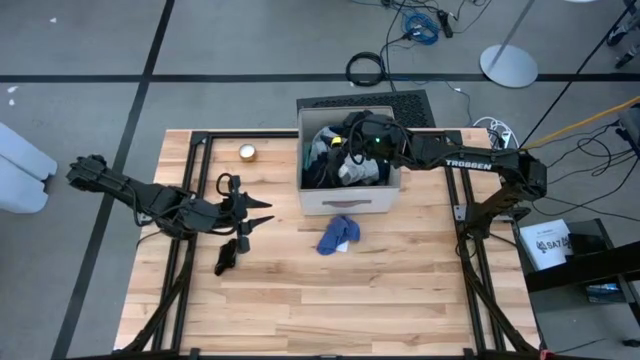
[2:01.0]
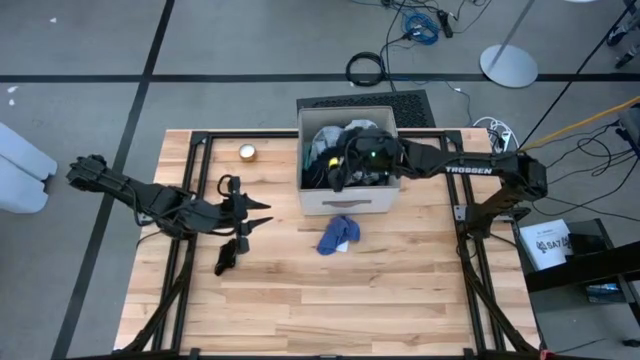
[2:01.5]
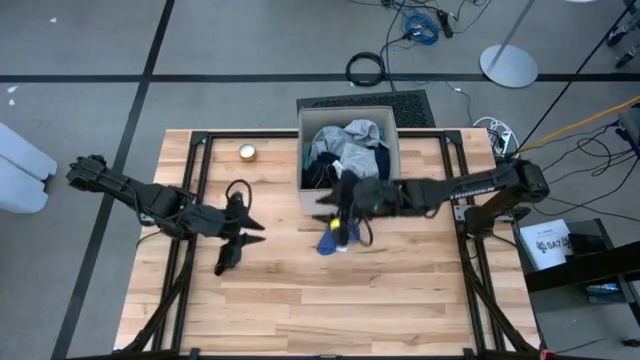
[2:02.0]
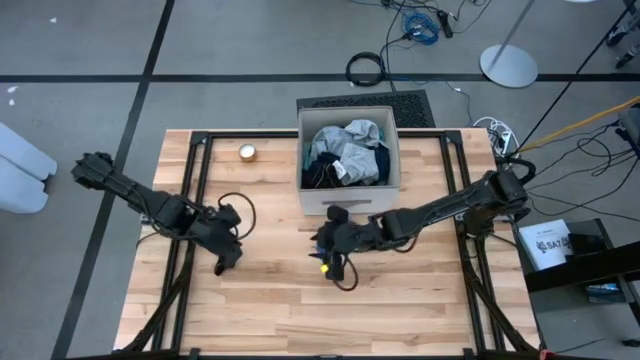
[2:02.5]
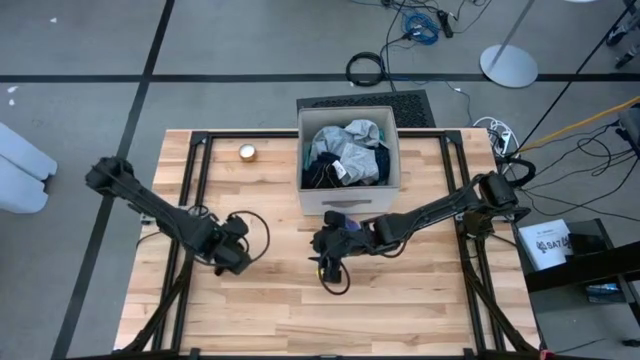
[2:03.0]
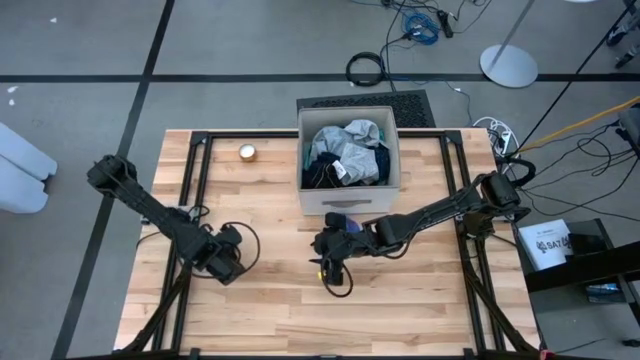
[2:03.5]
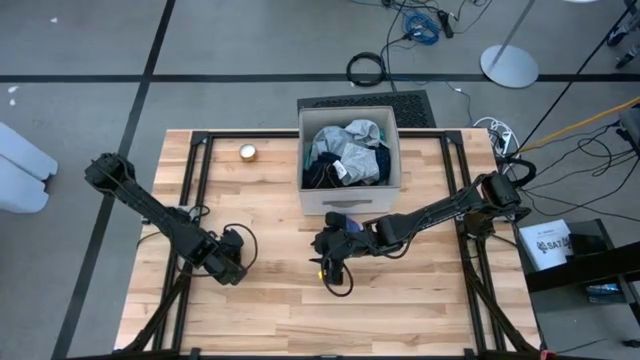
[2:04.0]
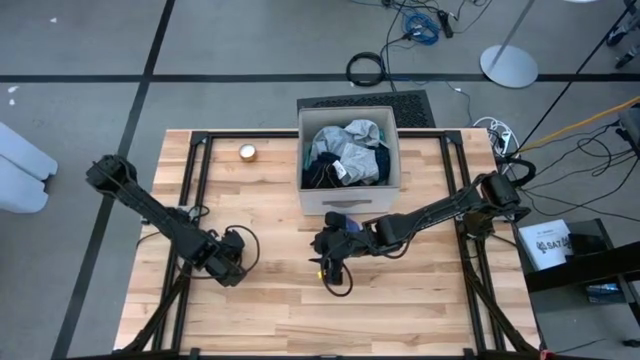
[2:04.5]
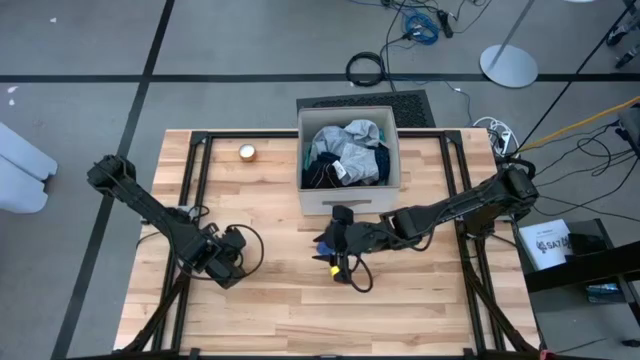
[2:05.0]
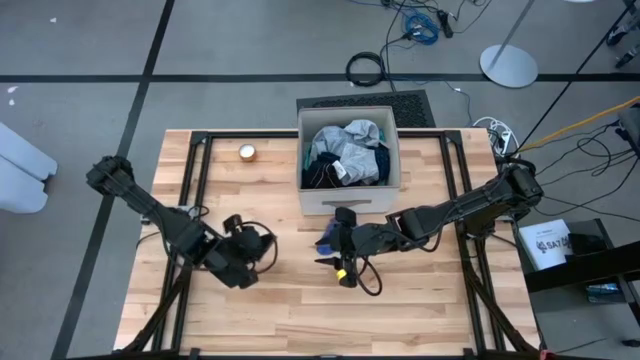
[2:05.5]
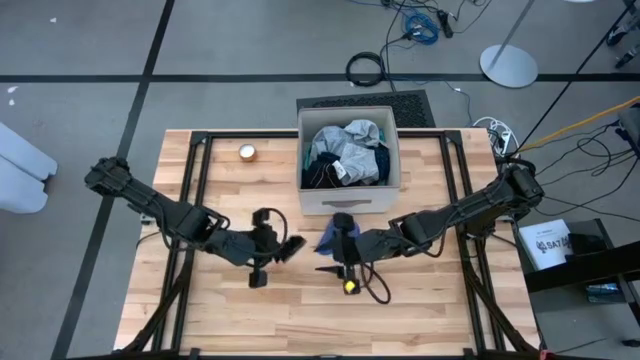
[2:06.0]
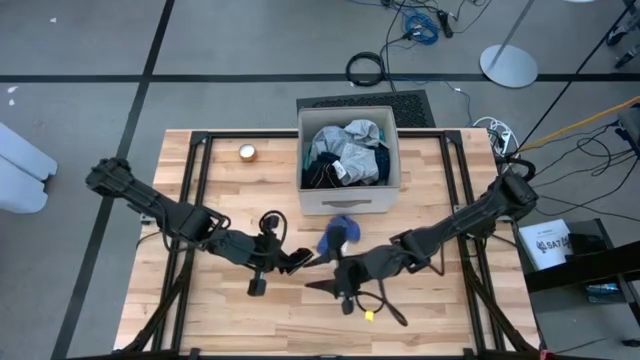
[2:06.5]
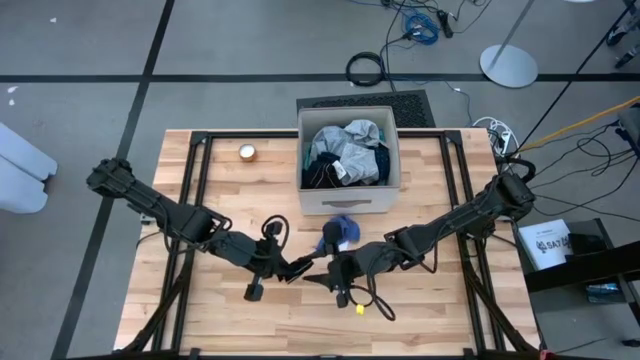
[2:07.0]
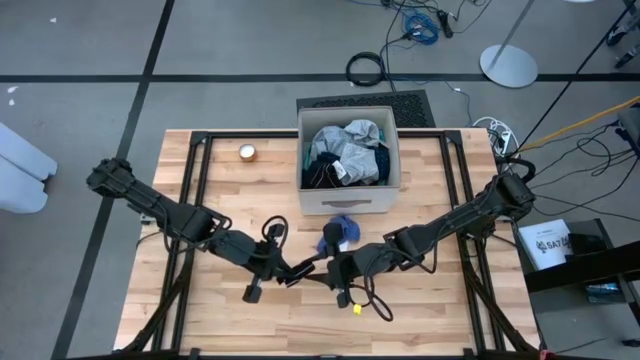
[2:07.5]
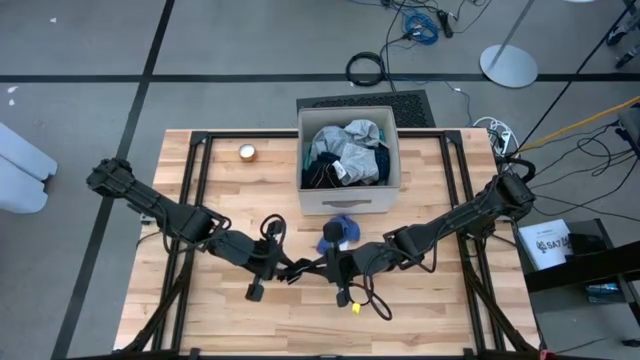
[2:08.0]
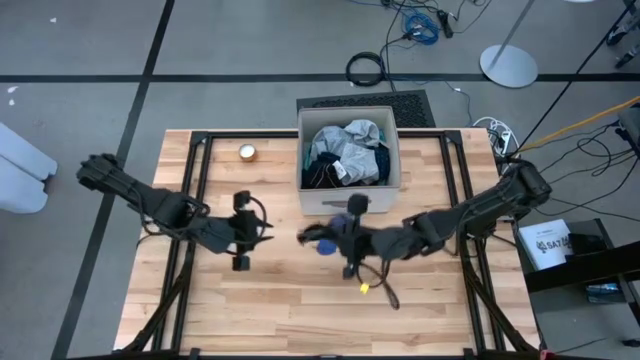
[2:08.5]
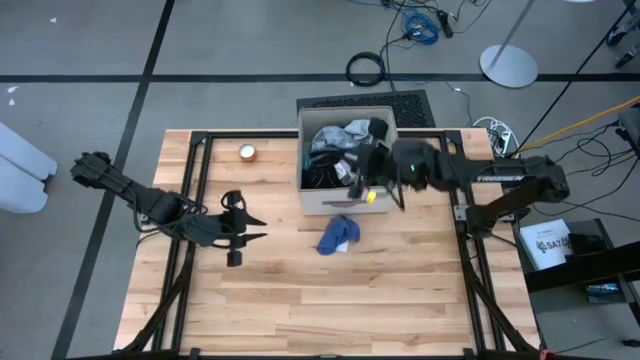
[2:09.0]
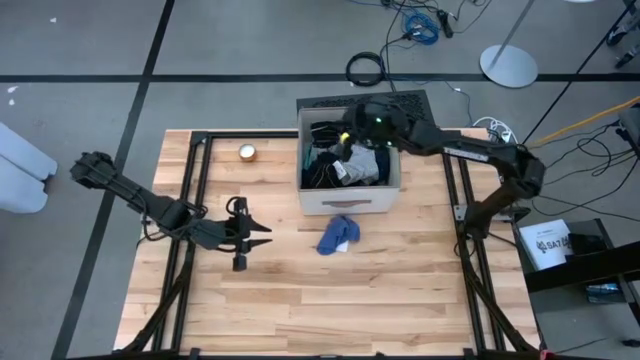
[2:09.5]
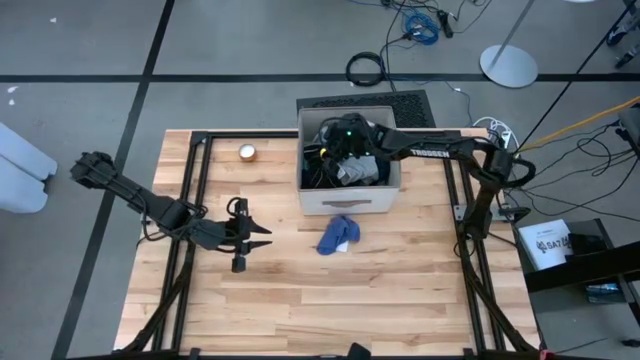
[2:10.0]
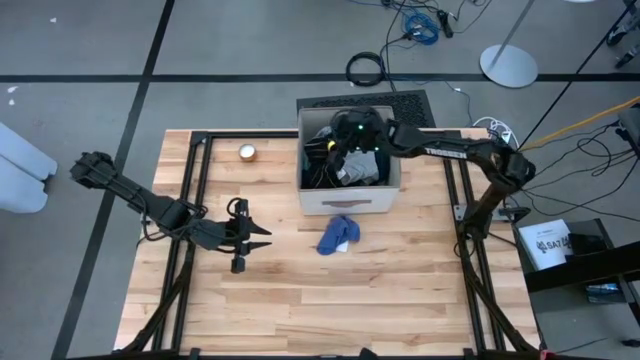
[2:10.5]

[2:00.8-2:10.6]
Task: Sort clothes
Put the black sock into the laundry organizer

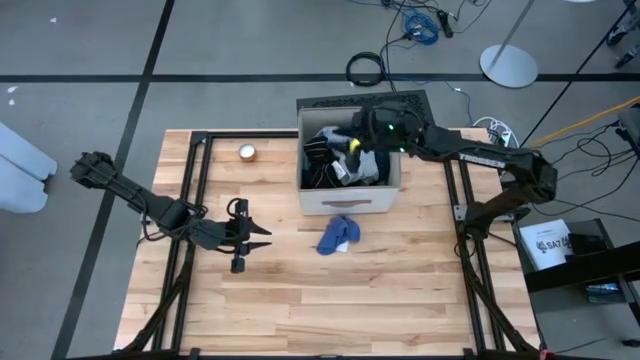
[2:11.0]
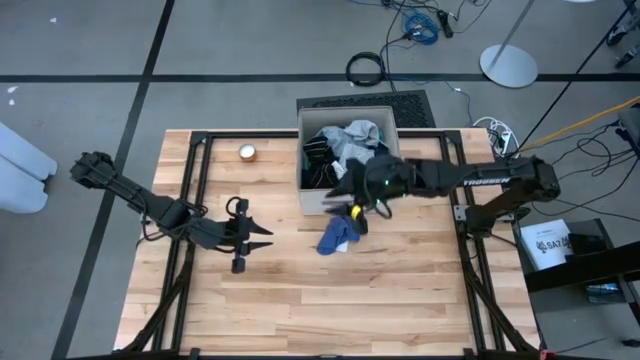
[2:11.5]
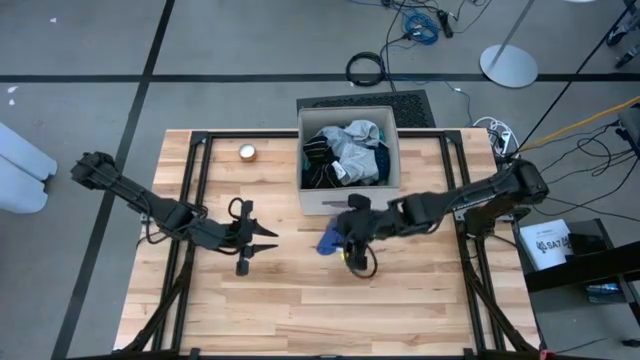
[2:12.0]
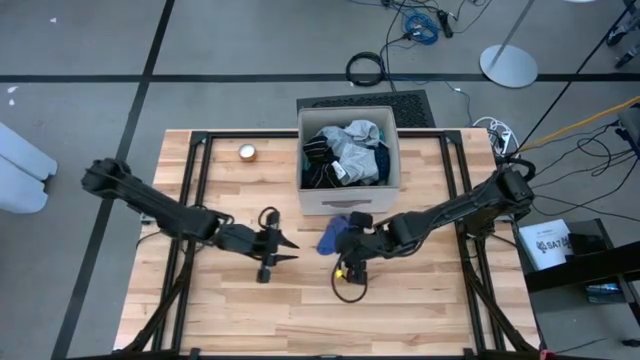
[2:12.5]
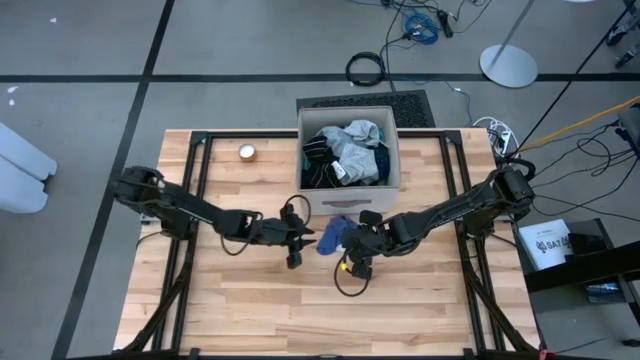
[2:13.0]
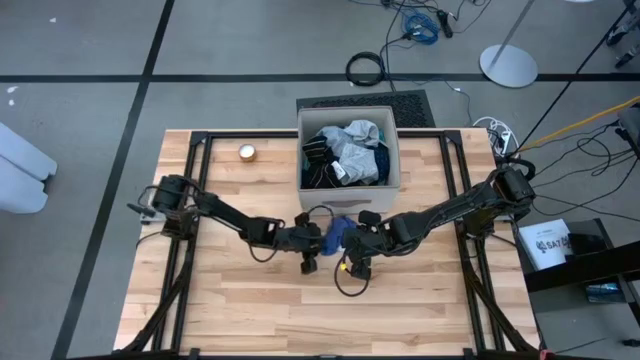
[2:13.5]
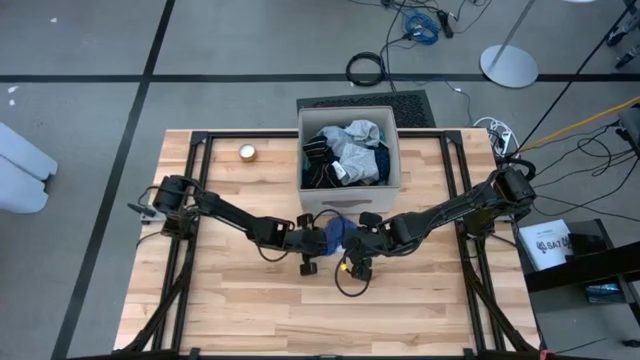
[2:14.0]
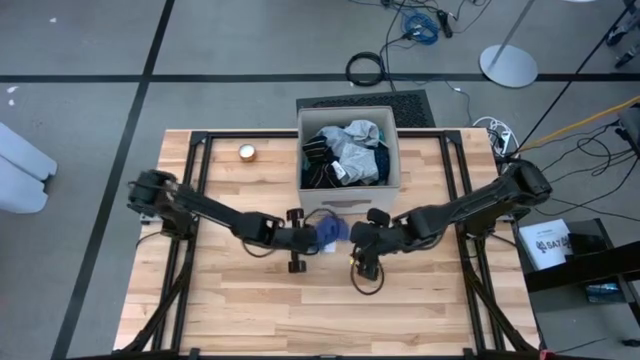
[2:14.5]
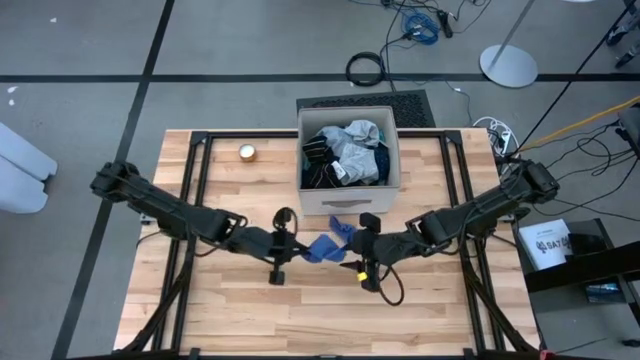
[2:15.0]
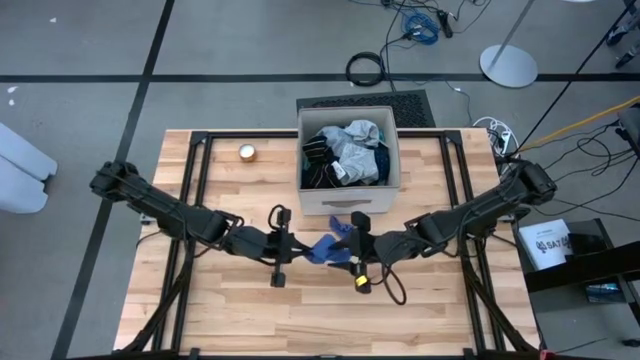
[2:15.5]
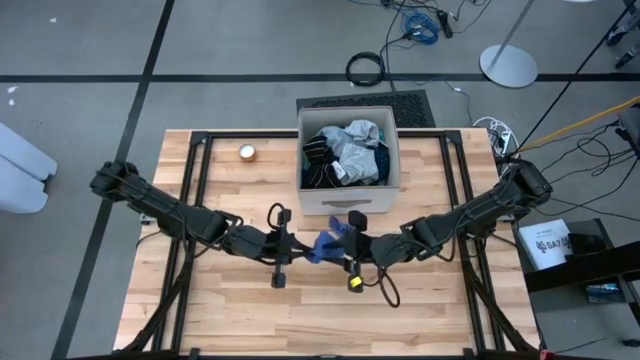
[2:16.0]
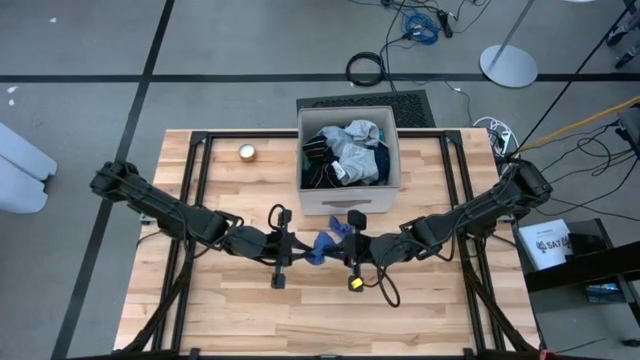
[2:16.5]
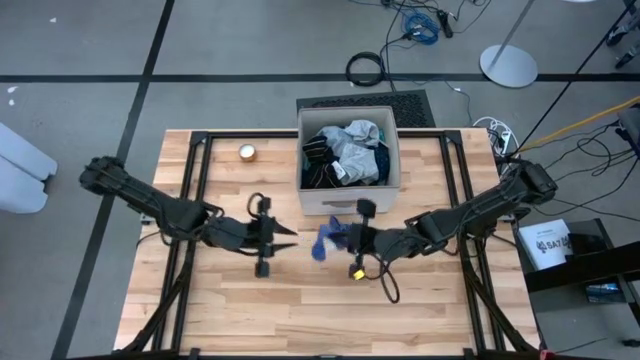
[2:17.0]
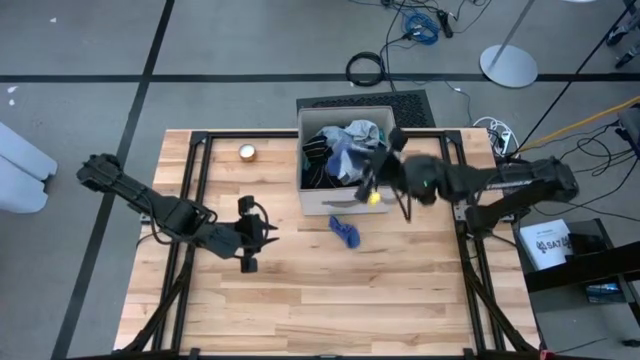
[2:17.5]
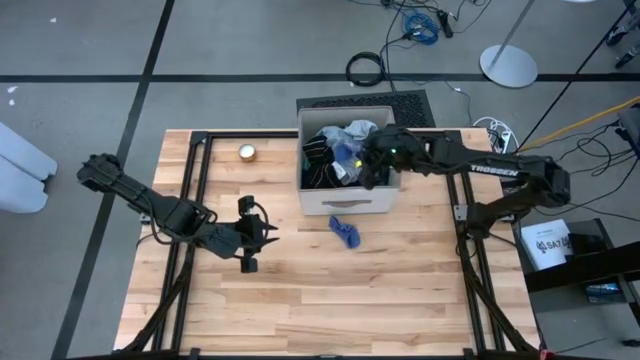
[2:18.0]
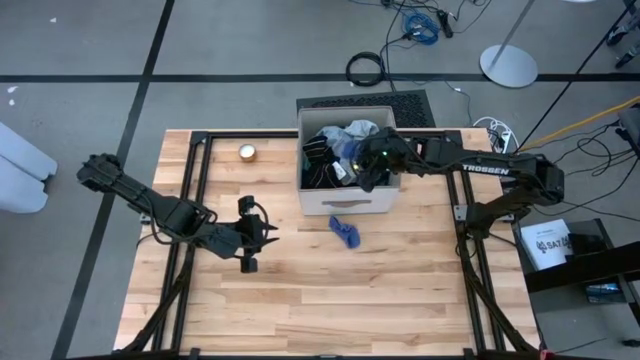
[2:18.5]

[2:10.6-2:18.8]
Put the purple sock into the laundry organizer

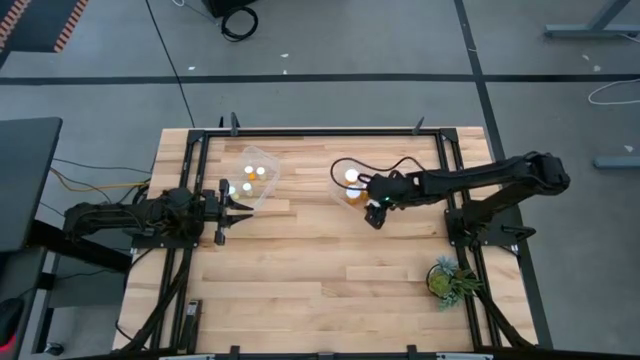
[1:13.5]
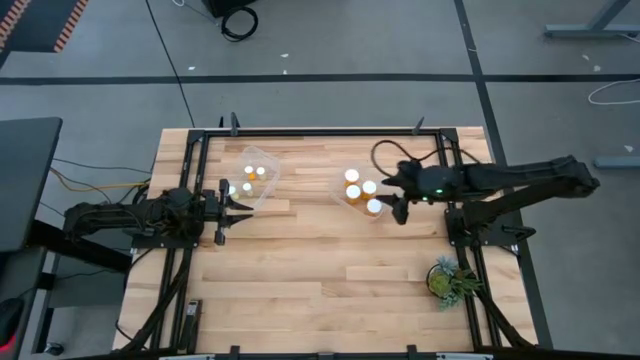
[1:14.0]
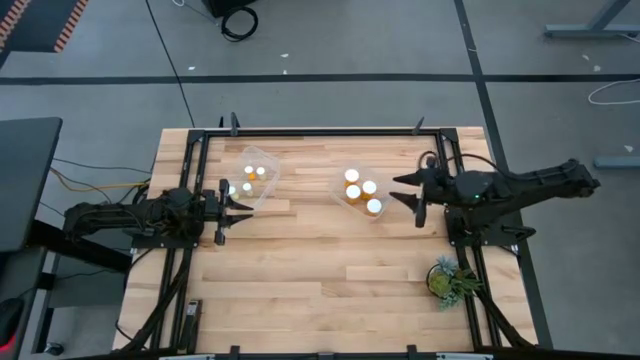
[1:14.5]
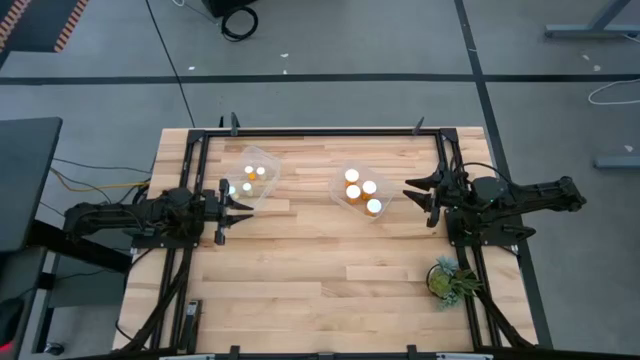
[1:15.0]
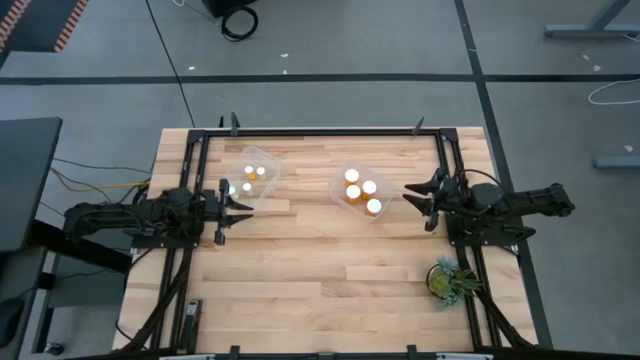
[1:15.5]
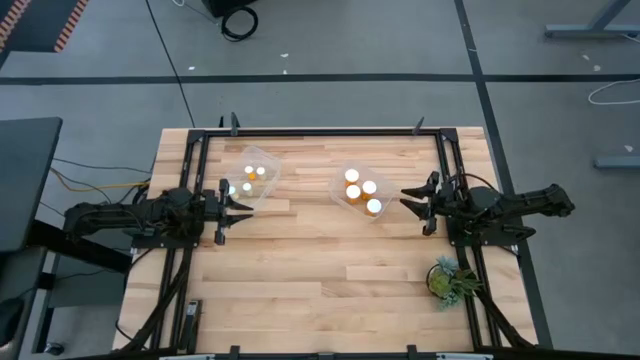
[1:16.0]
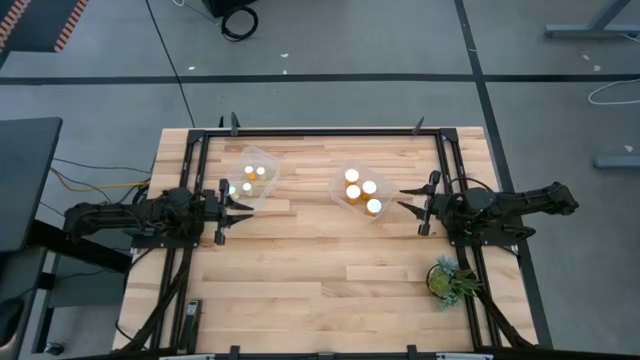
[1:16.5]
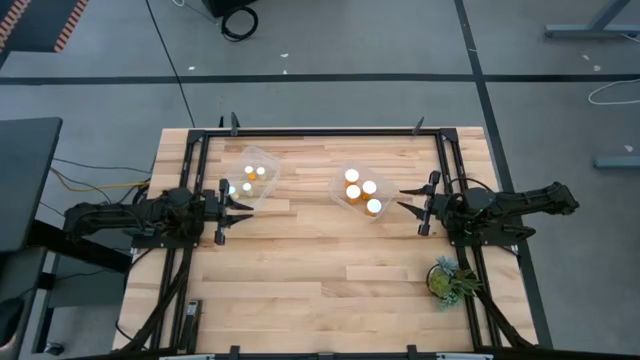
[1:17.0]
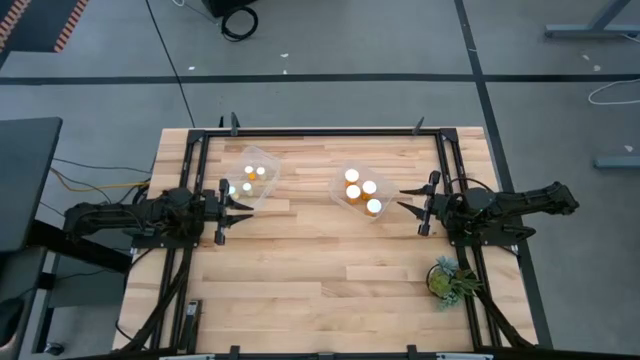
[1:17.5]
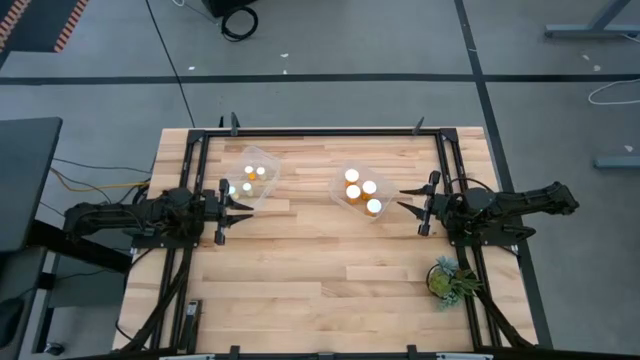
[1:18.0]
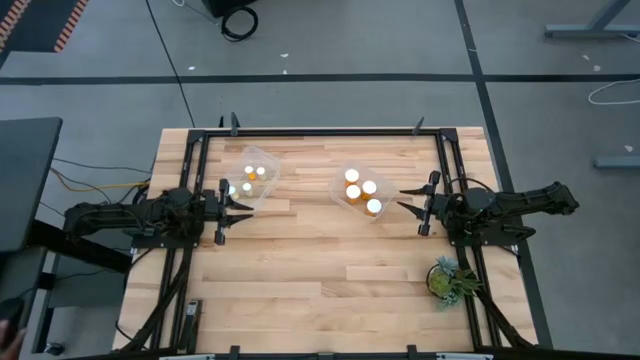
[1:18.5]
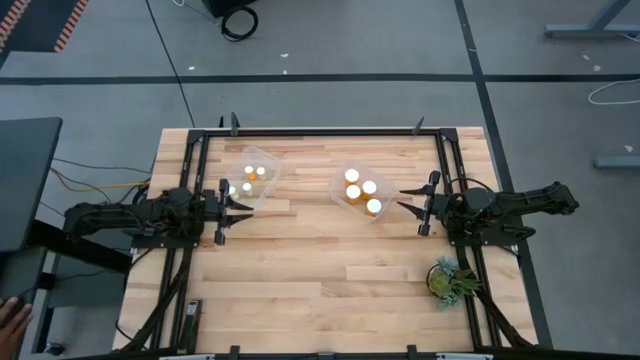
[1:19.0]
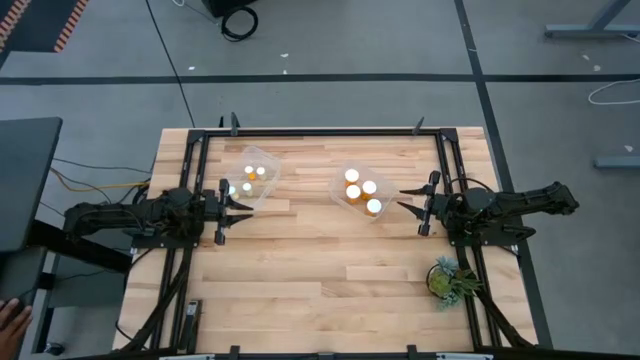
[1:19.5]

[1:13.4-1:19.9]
Task: Pick and place medicine bottles into bin by pill shape (circle, oval)
Return to Home Position
